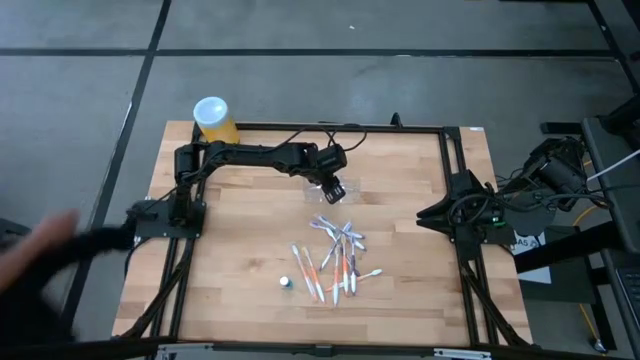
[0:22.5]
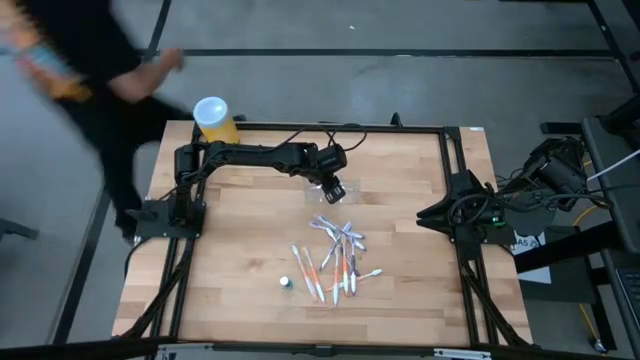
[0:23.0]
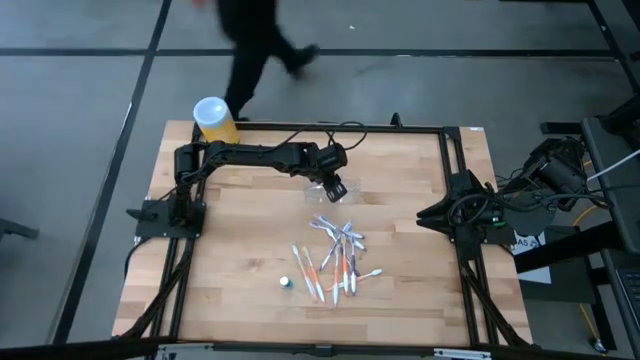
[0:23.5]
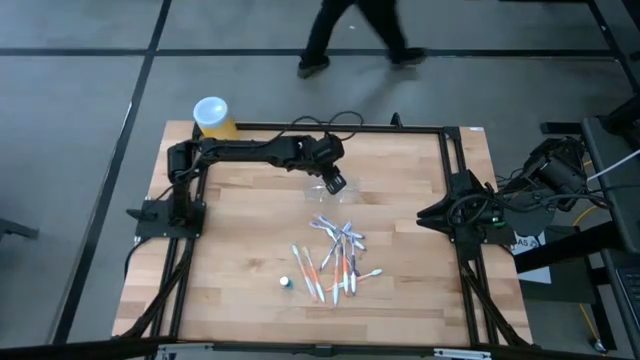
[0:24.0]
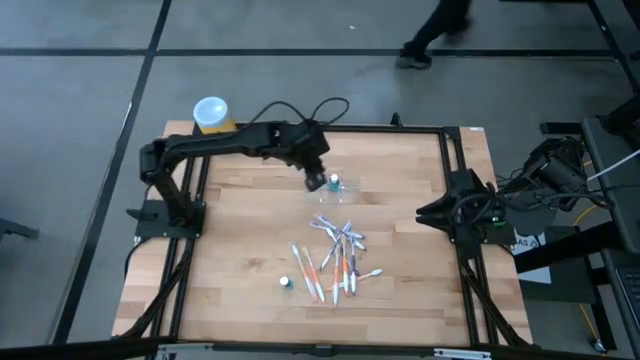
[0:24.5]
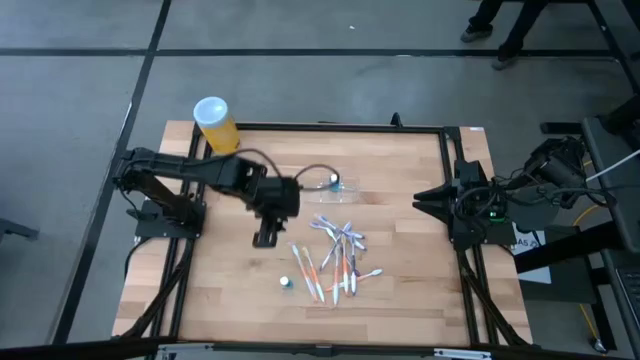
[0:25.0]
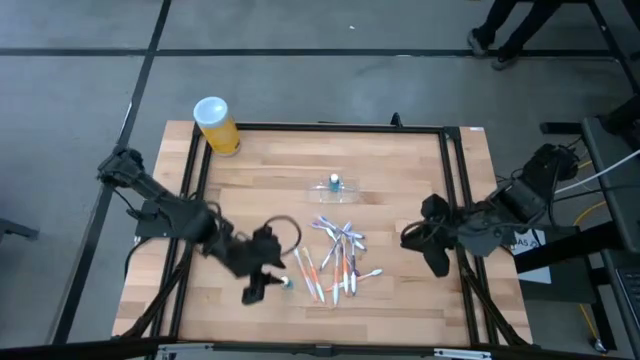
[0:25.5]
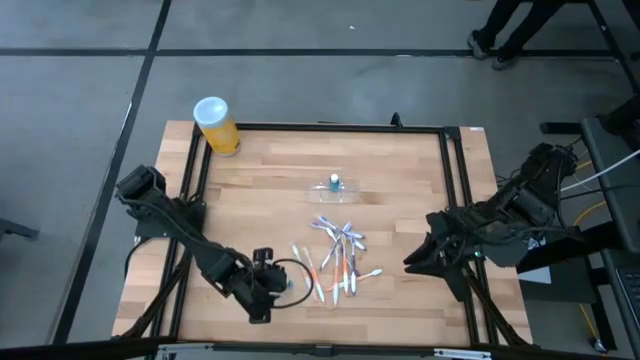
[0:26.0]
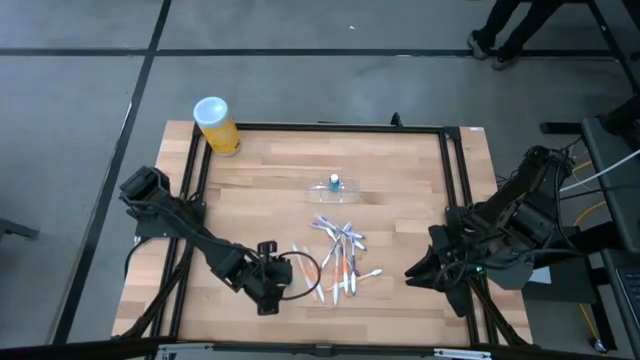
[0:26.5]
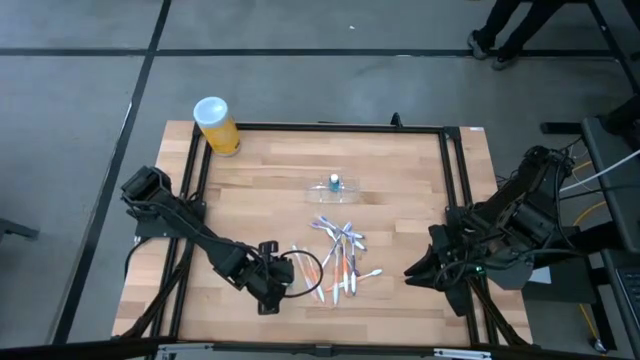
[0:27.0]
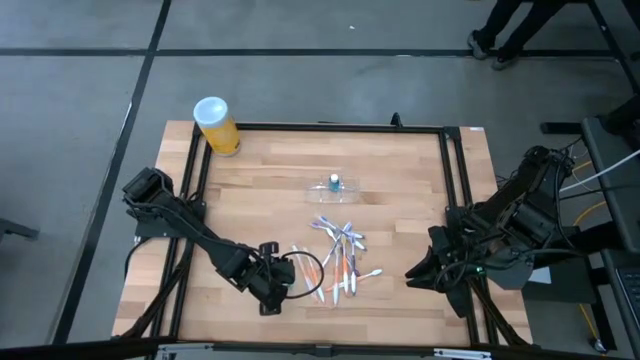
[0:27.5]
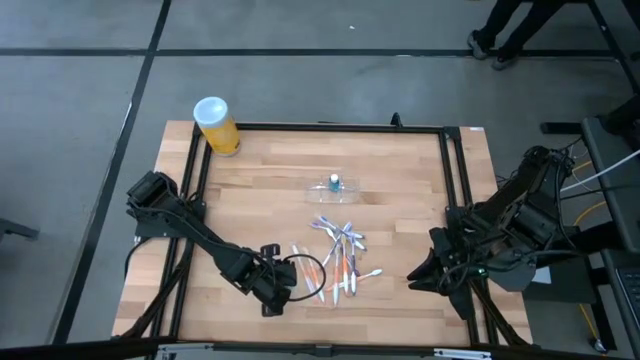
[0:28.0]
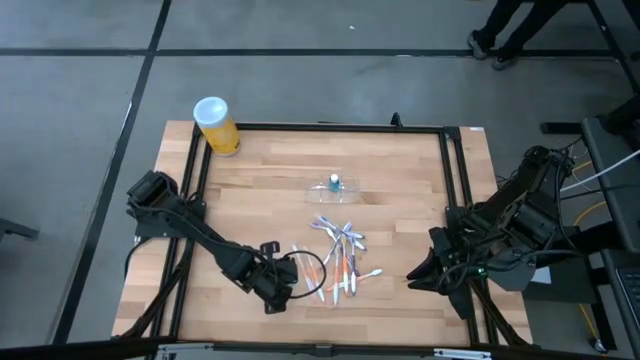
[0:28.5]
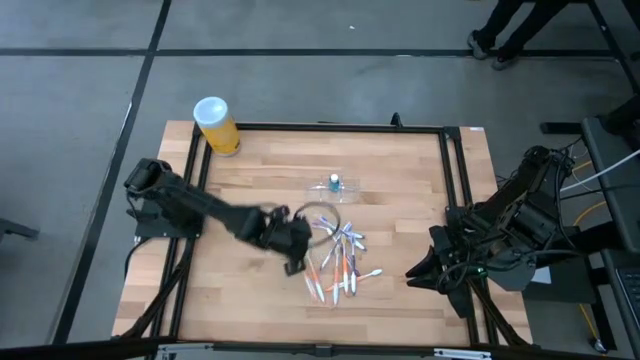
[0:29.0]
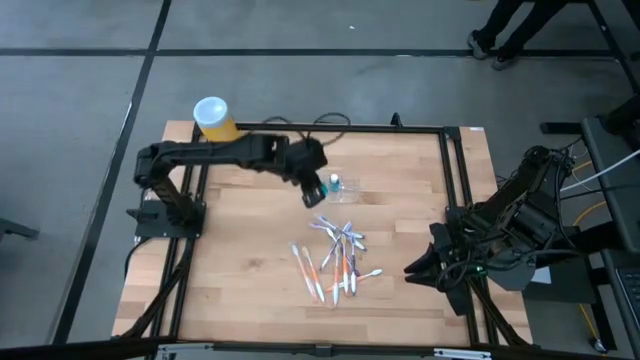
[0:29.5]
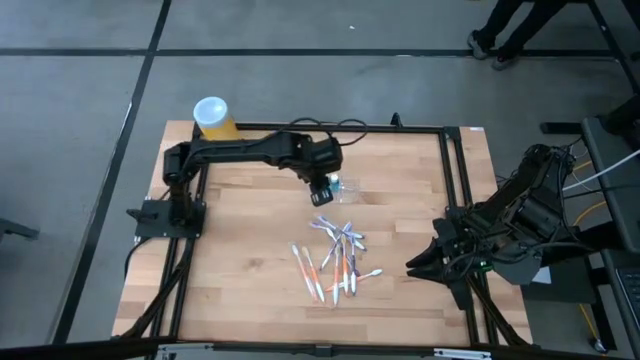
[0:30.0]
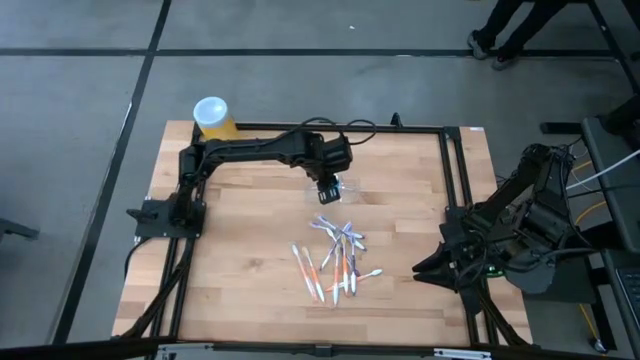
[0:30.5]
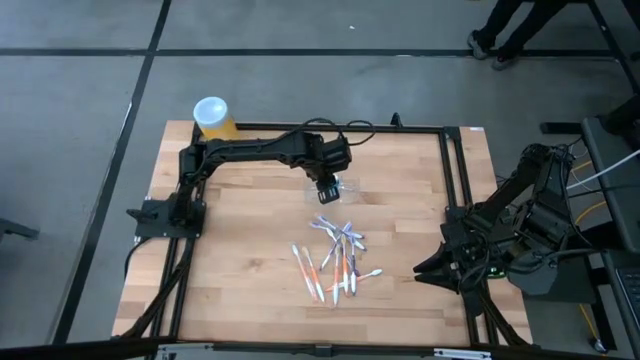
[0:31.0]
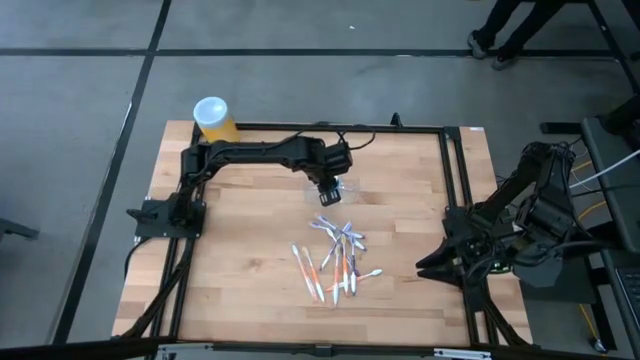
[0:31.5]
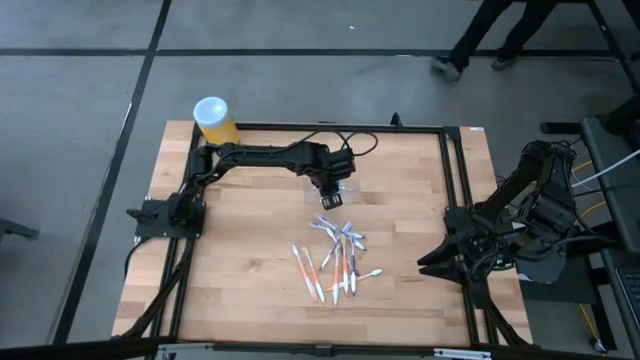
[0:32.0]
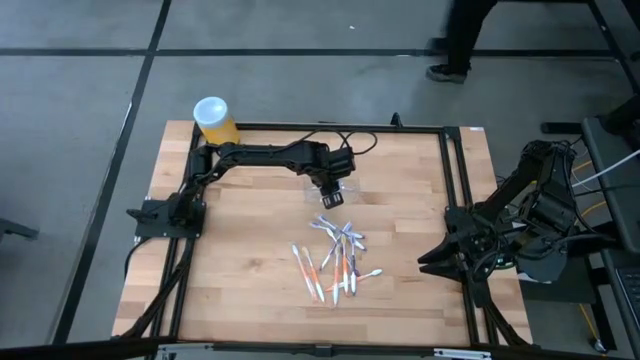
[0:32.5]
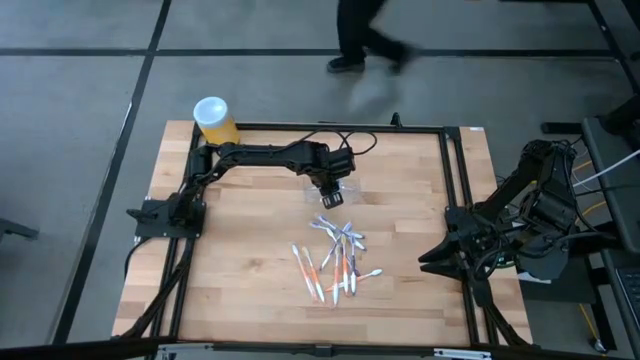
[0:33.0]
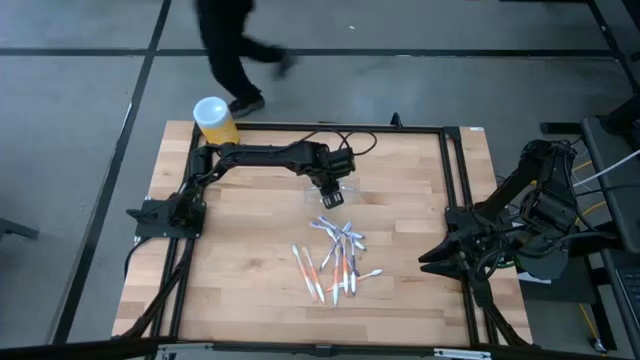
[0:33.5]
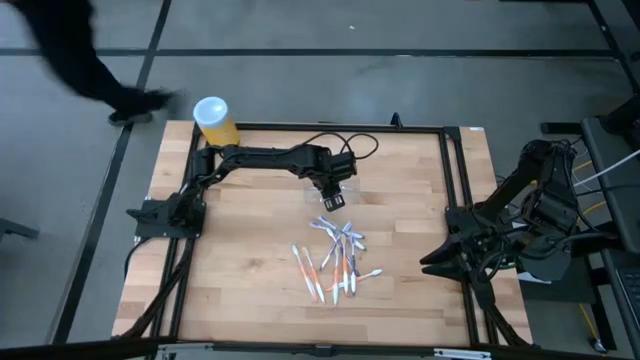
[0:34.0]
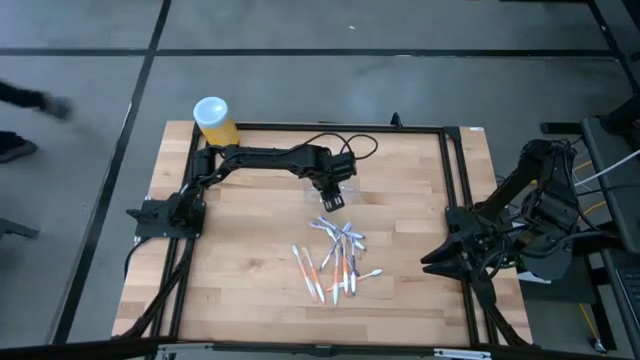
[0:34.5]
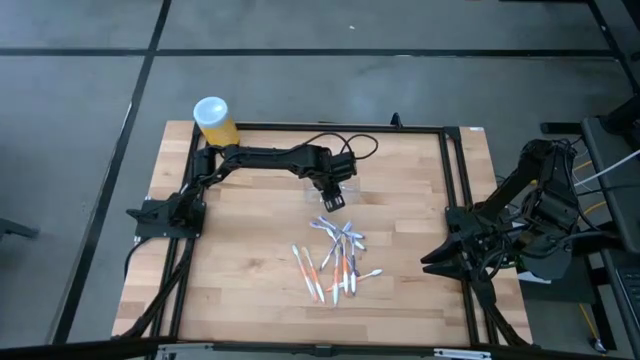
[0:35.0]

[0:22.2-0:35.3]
Task: Pick & Place toothbrushing station
Put the mouthwash into the transparent organizer

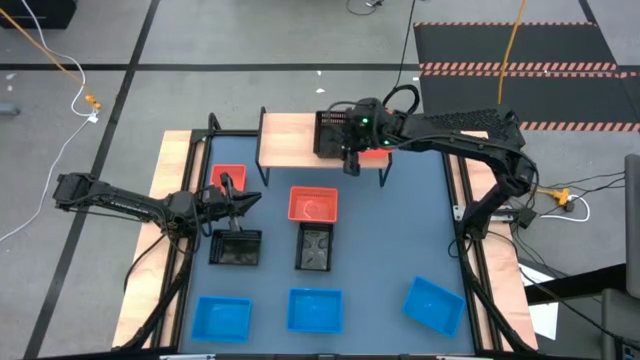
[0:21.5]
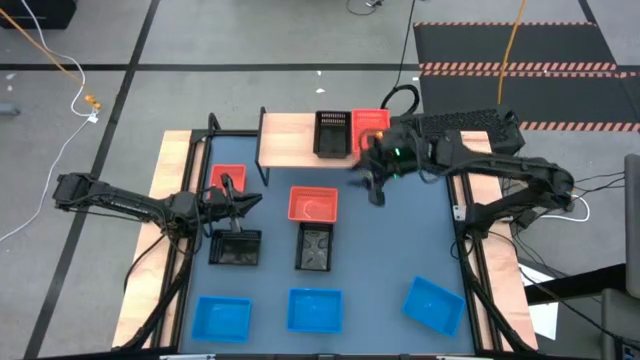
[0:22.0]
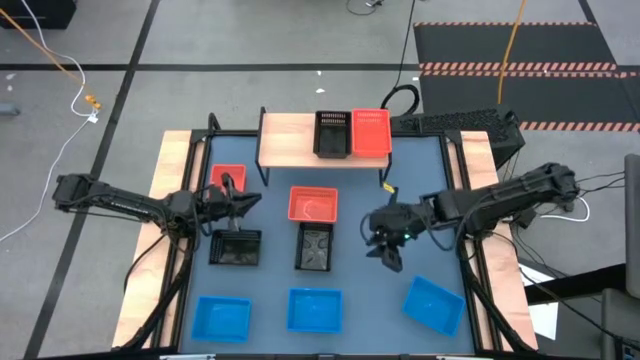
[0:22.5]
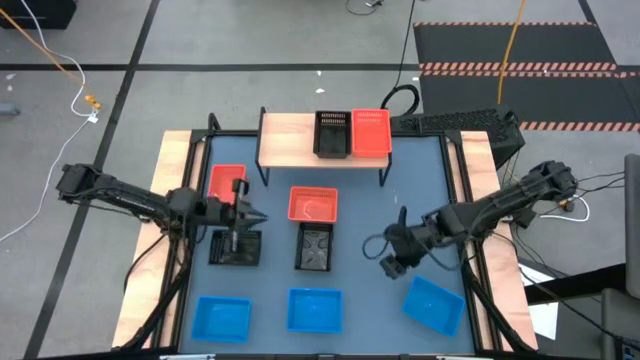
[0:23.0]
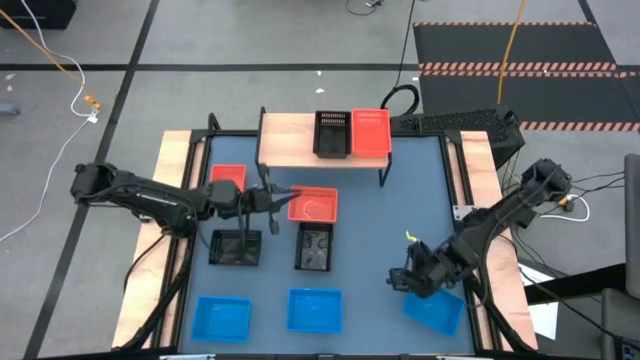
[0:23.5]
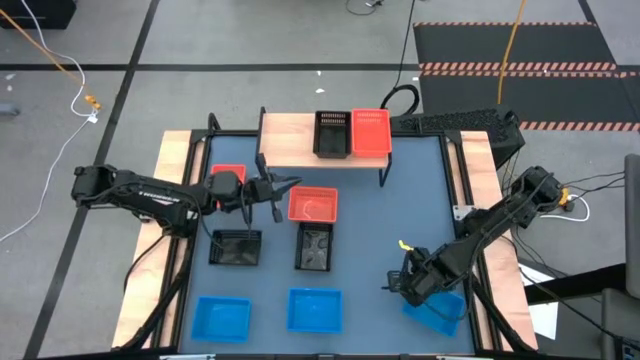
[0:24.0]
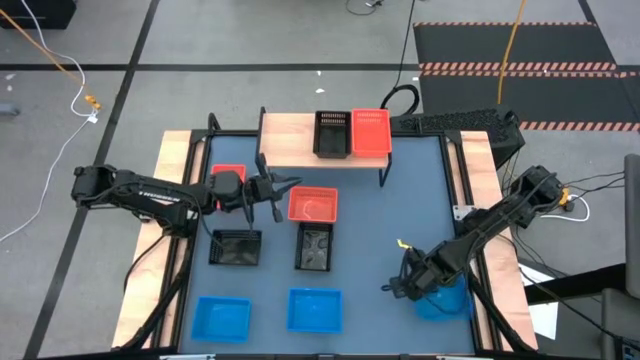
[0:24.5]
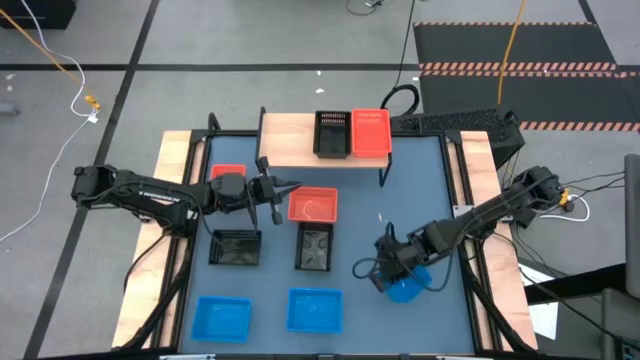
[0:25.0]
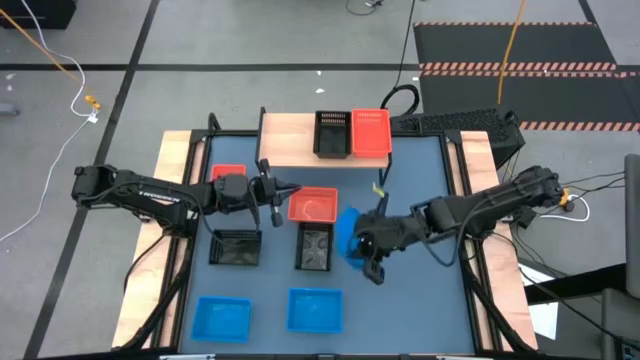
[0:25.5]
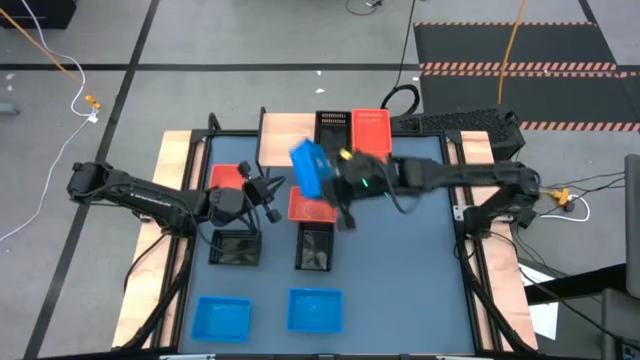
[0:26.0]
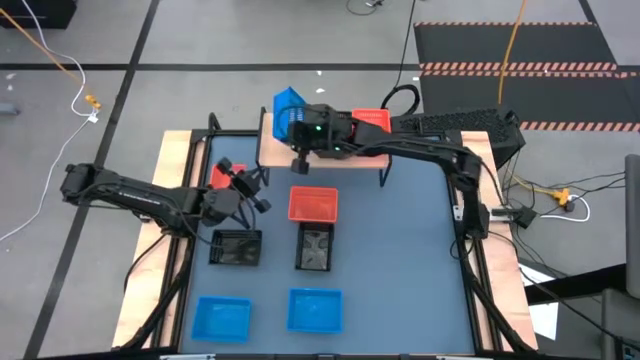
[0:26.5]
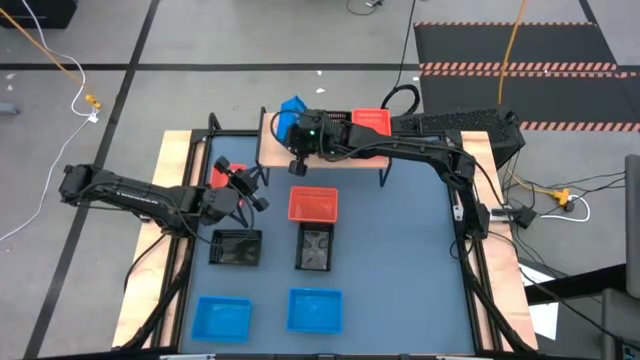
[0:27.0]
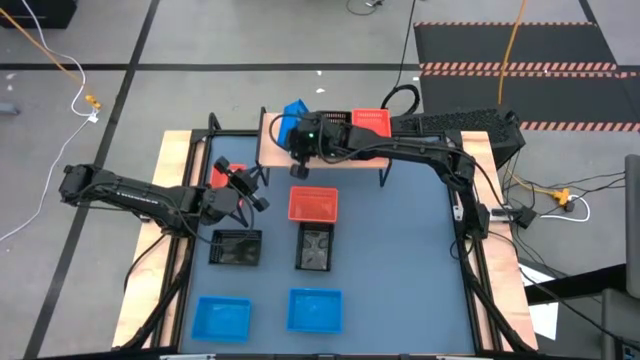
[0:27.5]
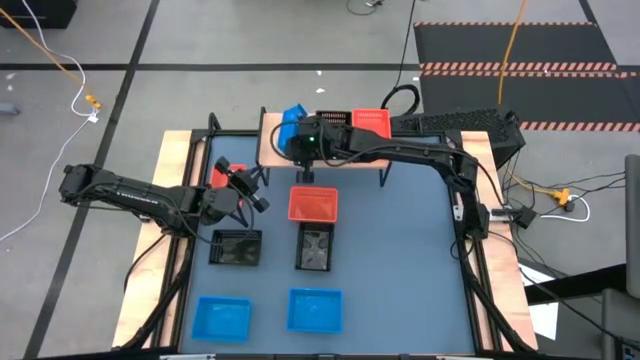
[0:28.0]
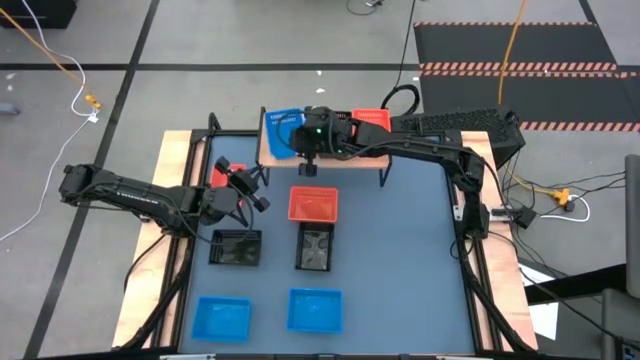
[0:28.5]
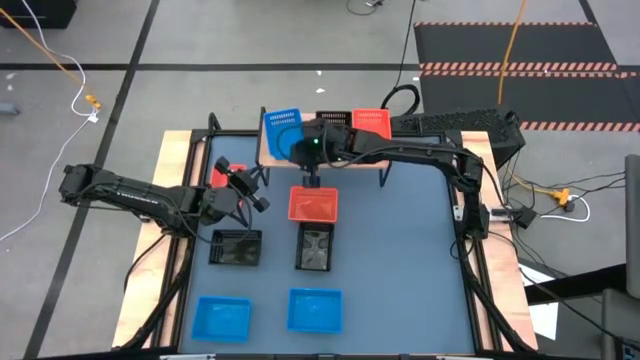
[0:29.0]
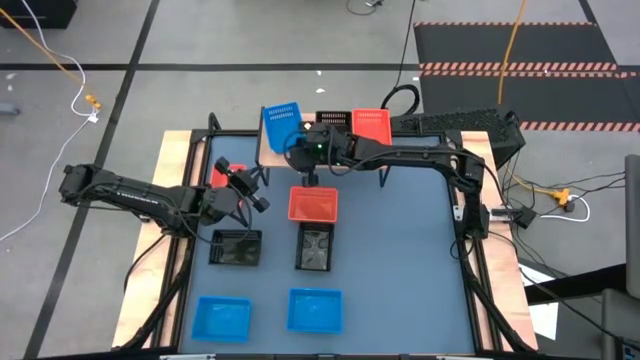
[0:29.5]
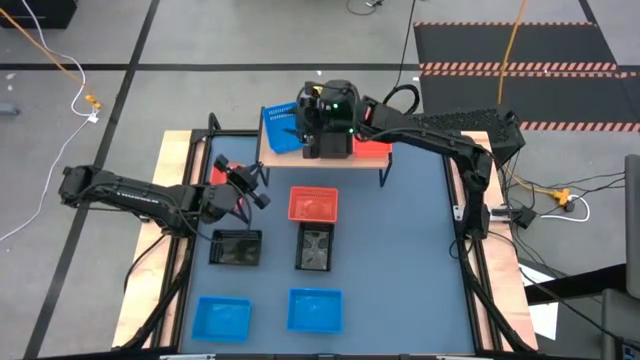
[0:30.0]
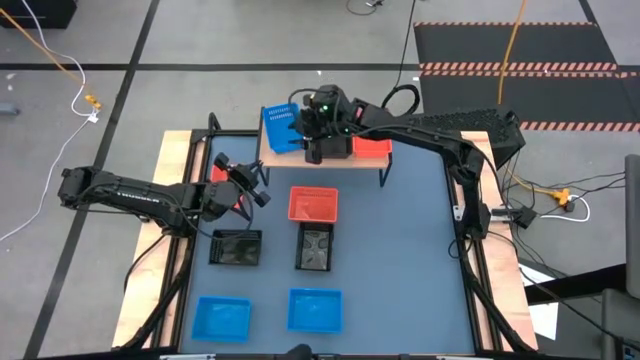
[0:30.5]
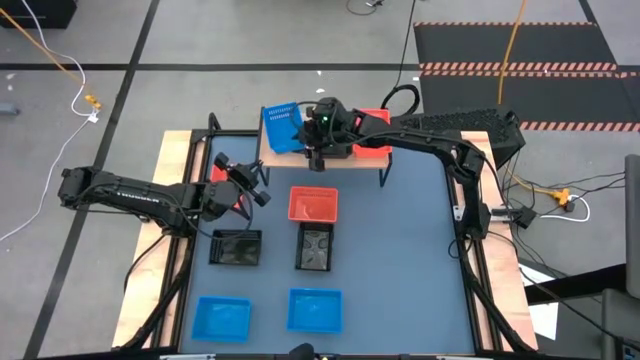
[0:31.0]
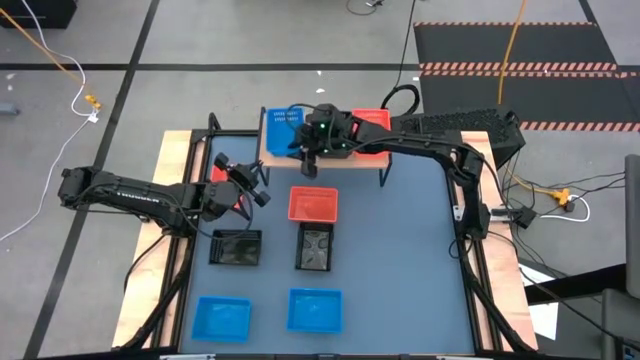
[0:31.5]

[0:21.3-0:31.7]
Task: Stack baskets on shelf by color
Put the right blue bin on the shelf
